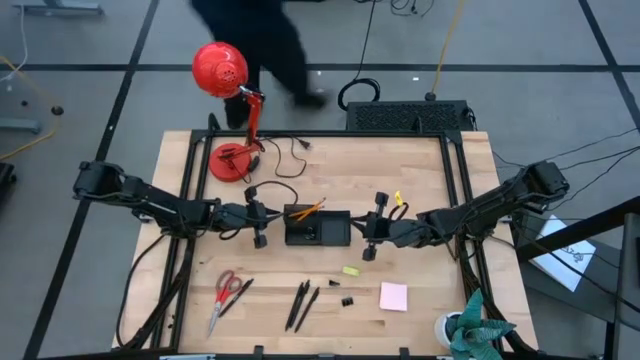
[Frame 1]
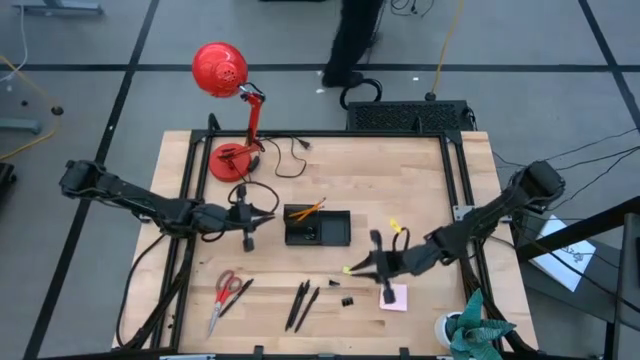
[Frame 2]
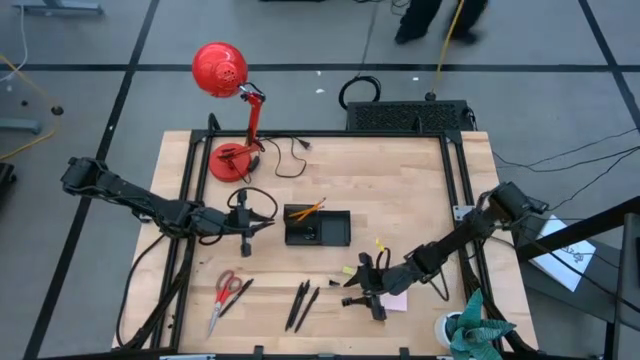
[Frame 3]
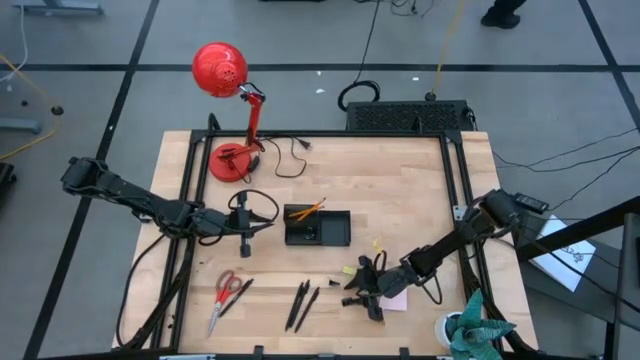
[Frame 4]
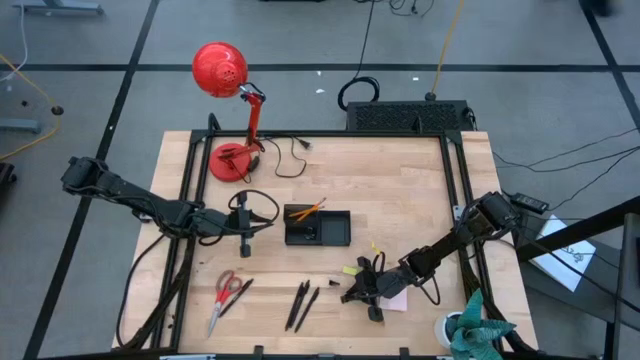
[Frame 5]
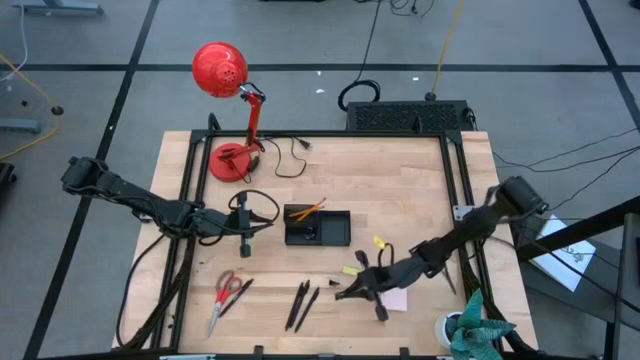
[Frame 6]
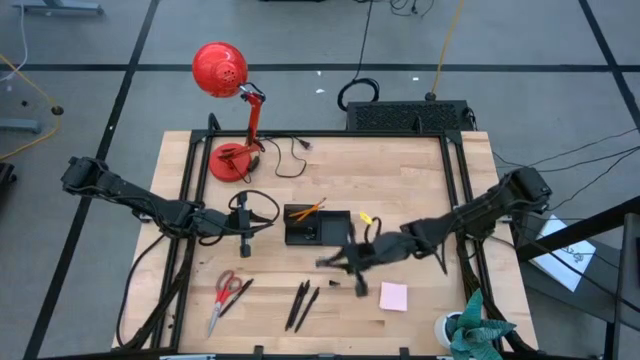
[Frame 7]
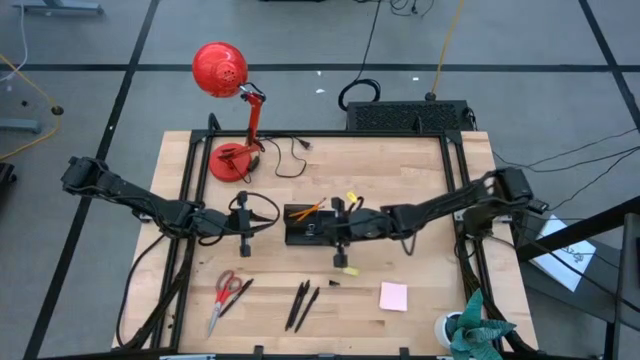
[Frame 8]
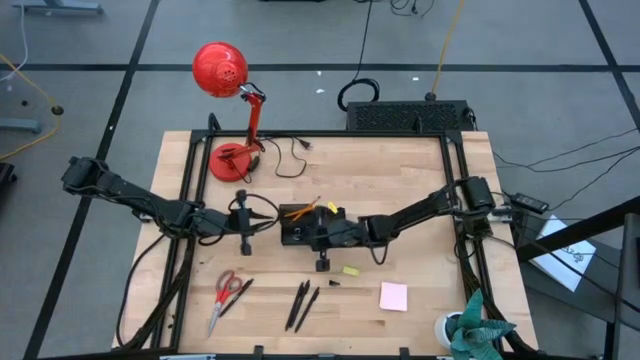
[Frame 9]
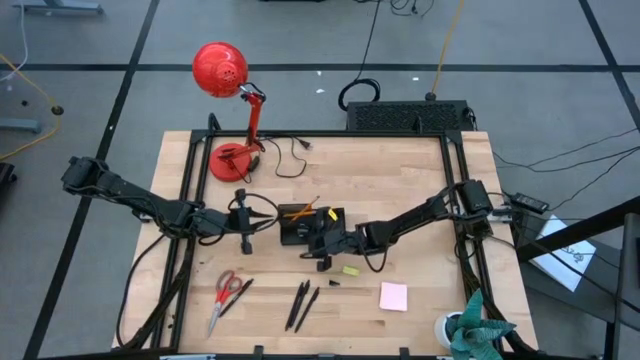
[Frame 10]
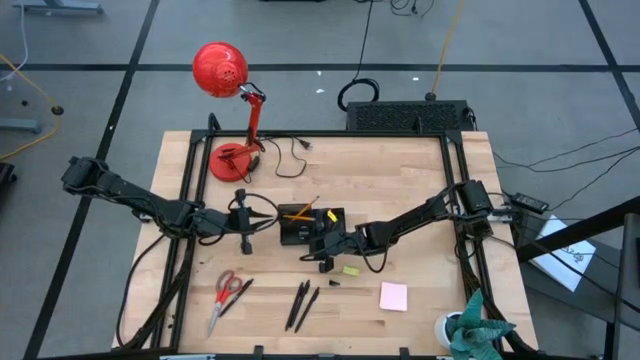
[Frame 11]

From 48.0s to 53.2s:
Task: Pick and place office supplies into organizer
Put the bottom binder clip into the bottom left section of the desk organizer

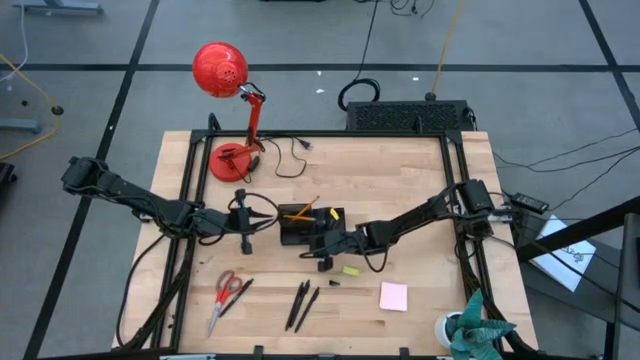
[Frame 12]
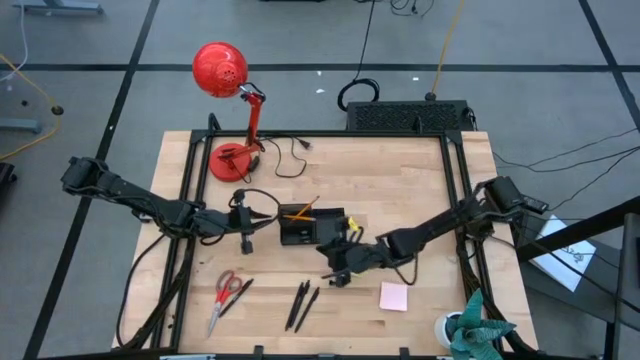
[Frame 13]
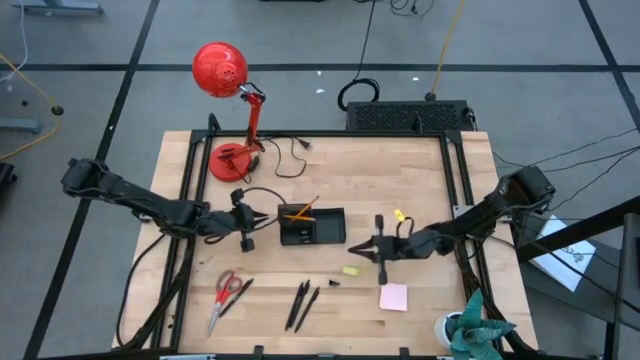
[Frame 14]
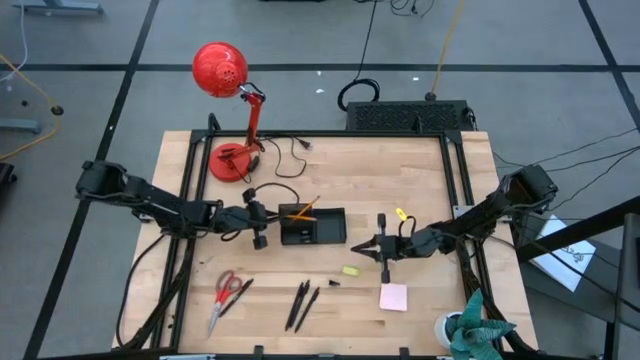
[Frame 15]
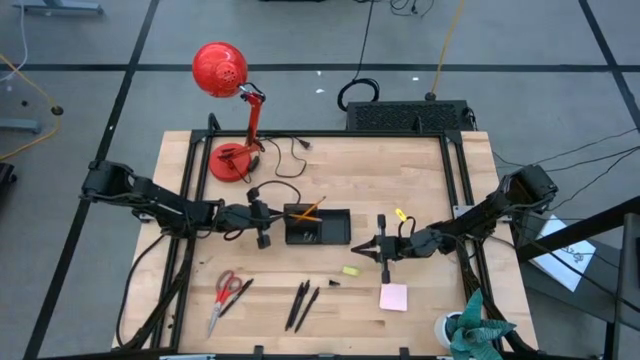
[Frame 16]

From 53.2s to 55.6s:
Adjust the black desk organizer

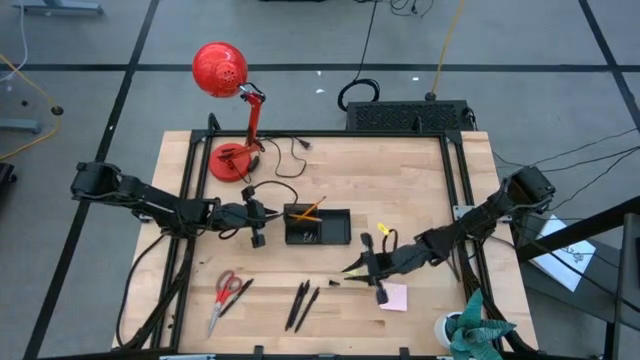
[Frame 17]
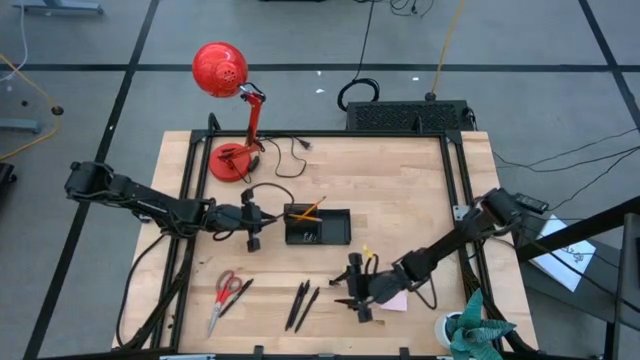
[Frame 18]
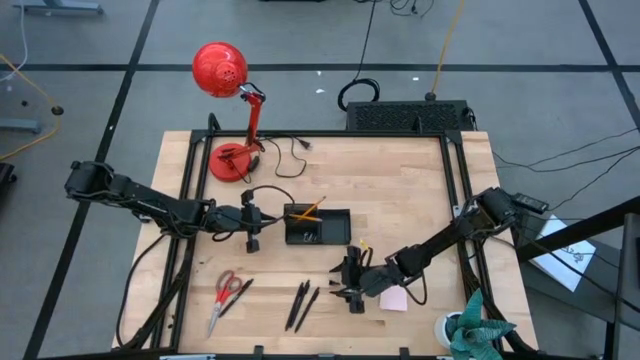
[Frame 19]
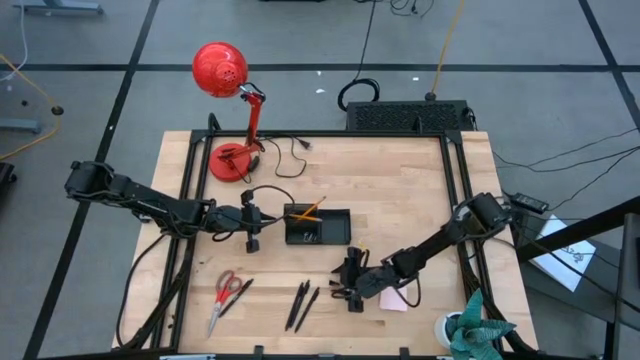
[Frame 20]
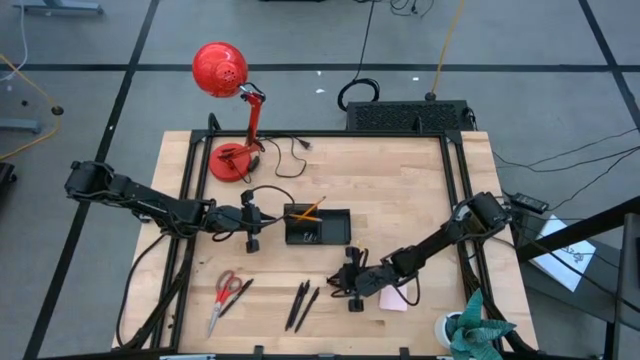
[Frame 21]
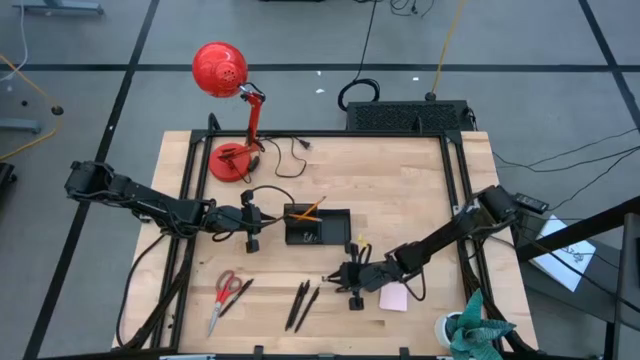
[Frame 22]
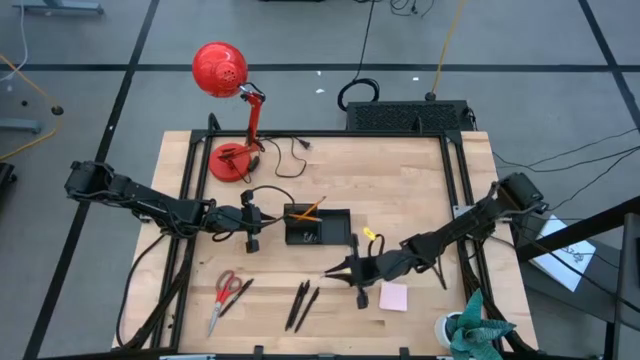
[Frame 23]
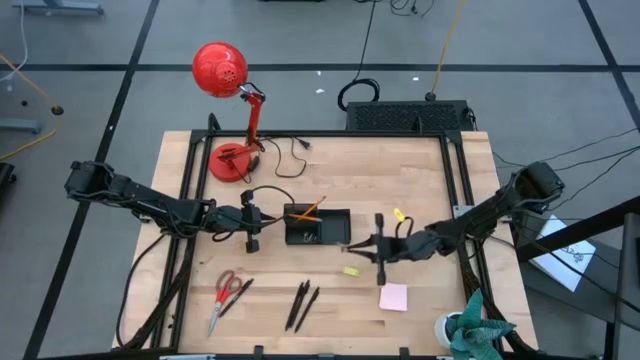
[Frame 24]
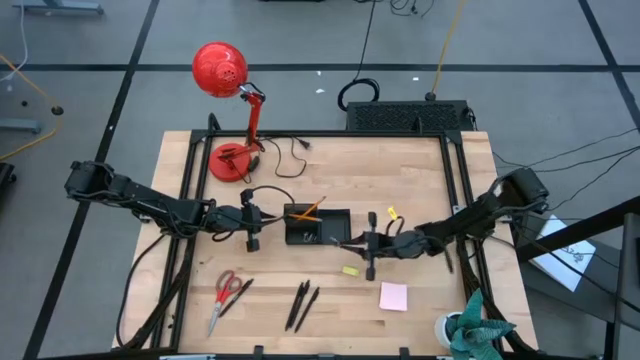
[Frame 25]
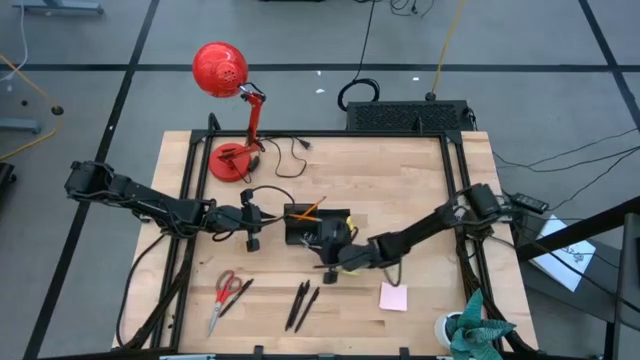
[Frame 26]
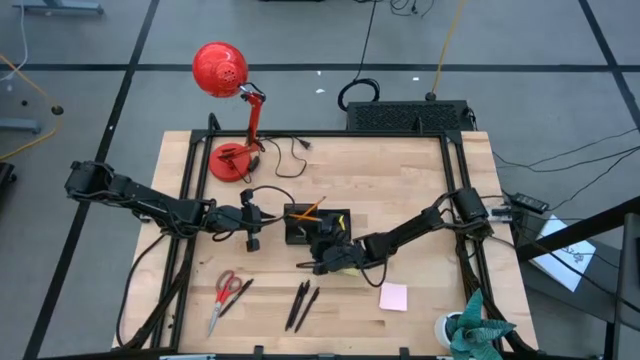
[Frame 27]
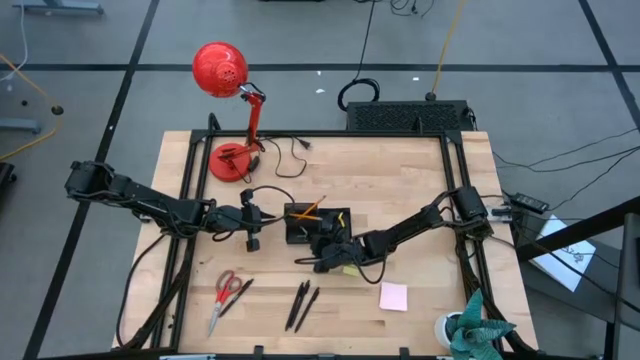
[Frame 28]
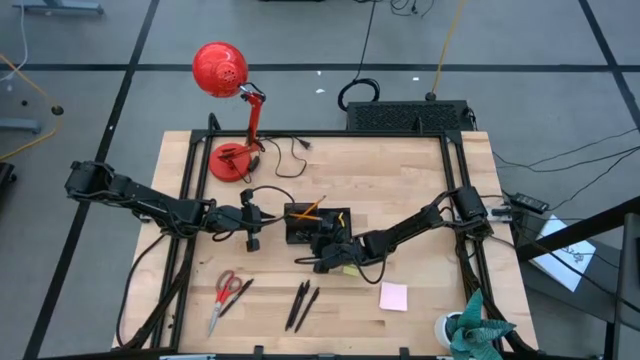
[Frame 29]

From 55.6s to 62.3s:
Put the binder clip into the bottom left section of the desk organizer

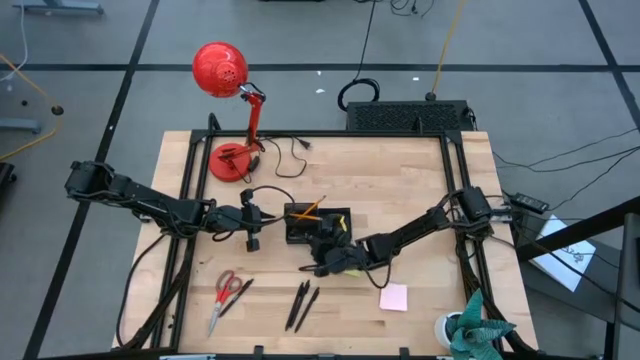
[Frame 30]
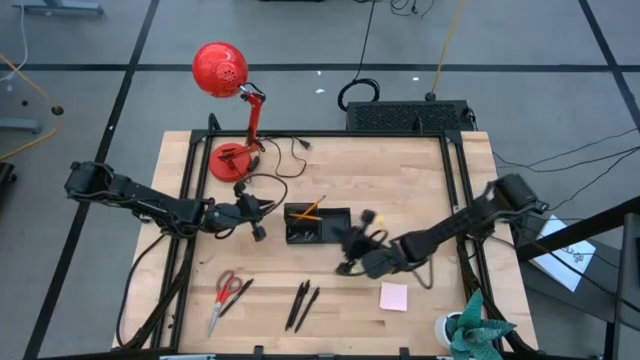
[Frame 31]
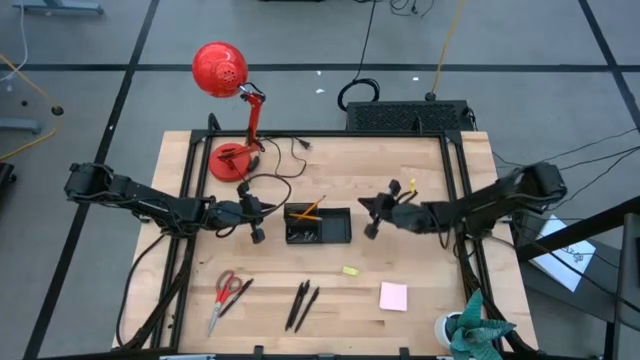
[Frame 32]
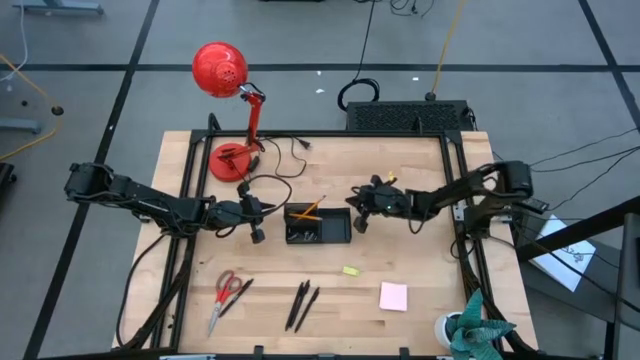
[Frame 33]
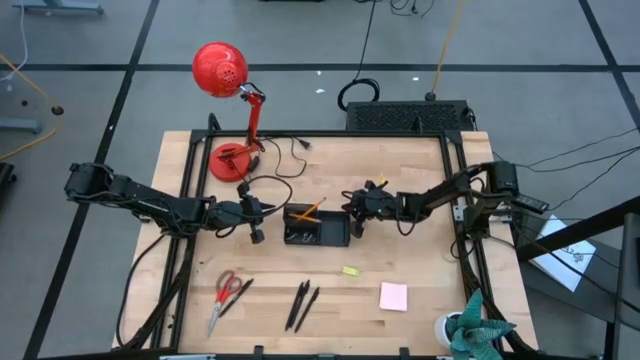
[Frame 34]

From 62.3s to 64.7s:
Adjust the black desk organizer

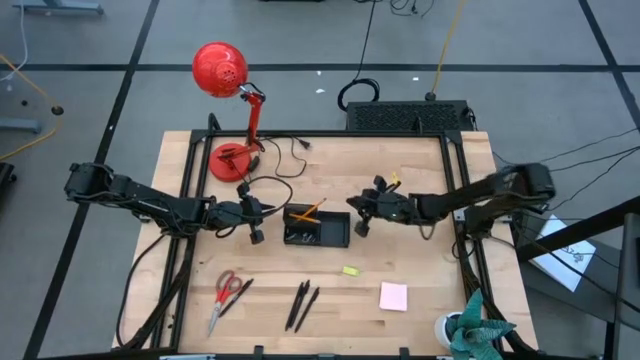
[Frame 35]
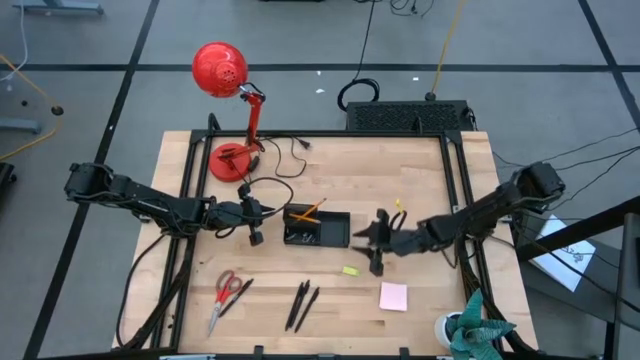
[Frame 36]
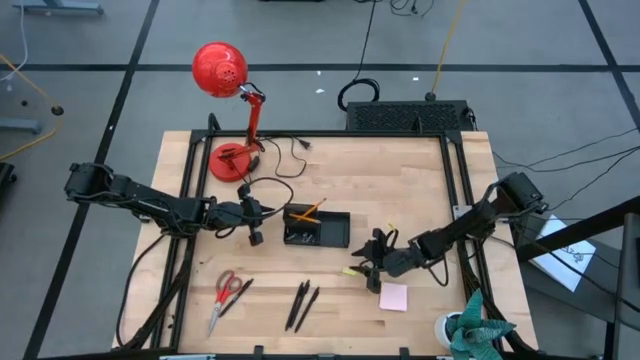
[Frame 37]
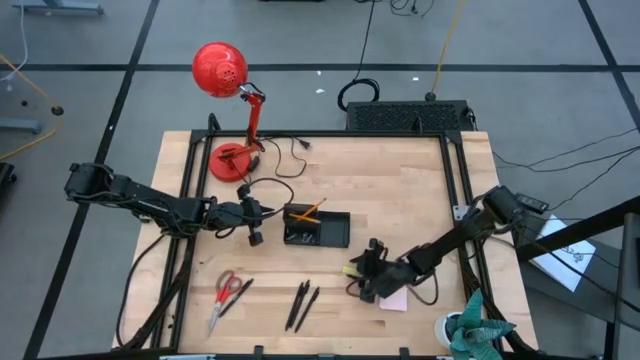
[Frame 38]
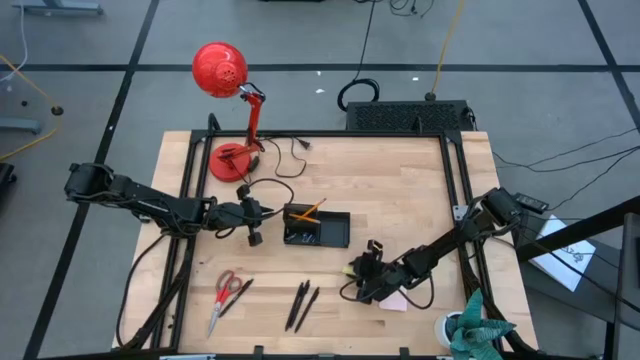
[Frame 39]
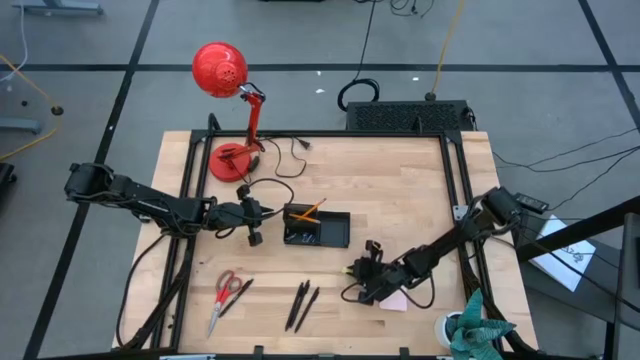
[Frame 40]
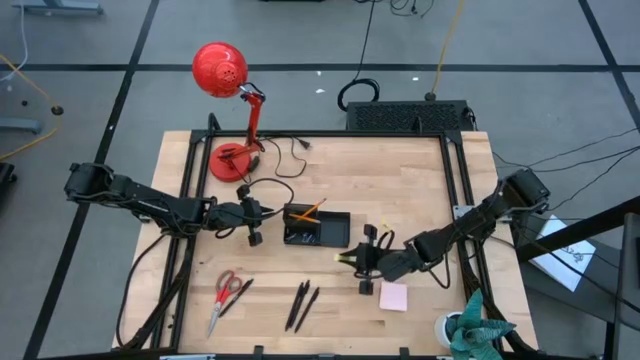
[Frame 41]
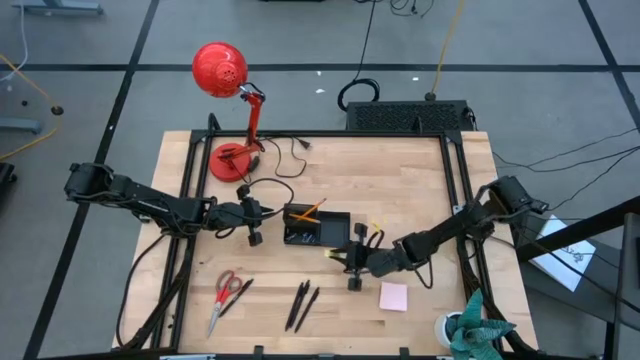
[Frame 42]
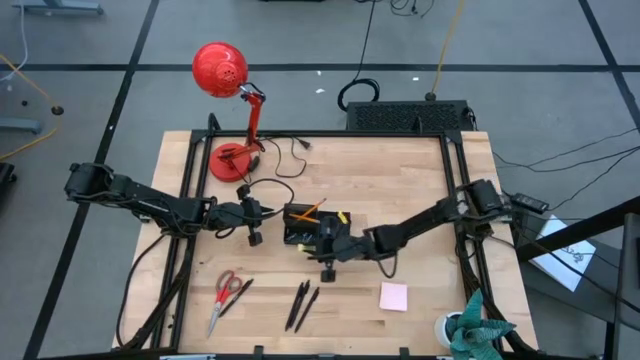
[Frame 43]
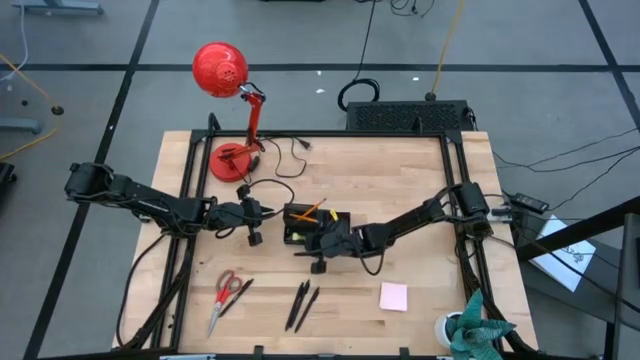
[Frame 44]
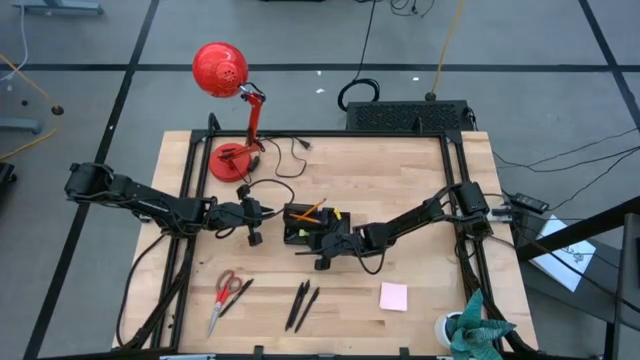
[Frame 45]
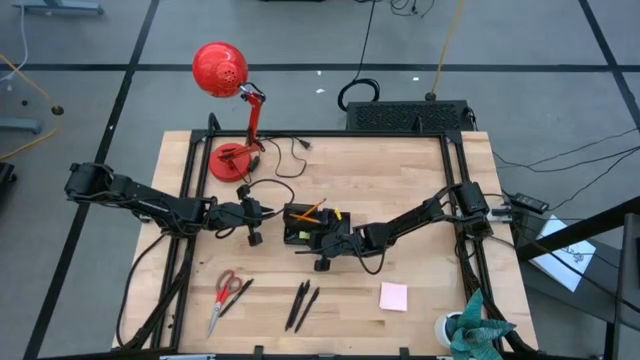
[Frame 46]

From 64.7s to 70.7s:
Put the yellow eraser into the bottom left section of the desk organizer
